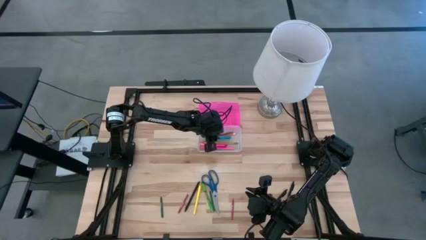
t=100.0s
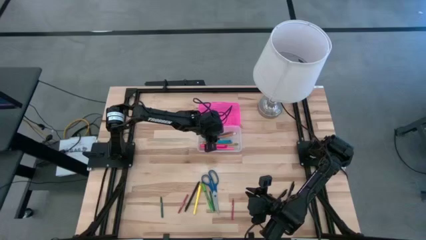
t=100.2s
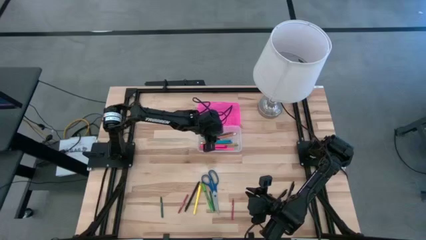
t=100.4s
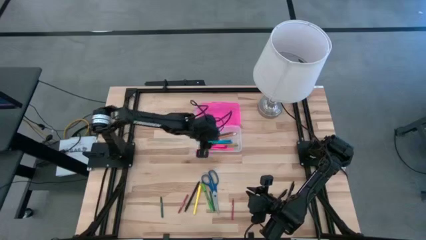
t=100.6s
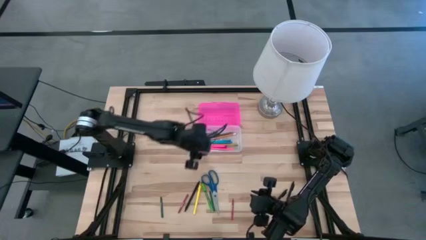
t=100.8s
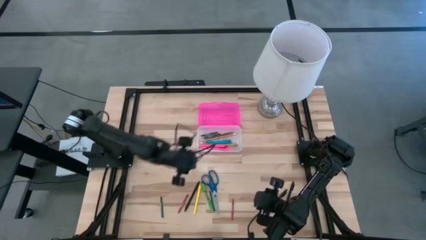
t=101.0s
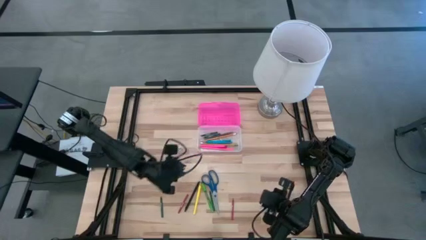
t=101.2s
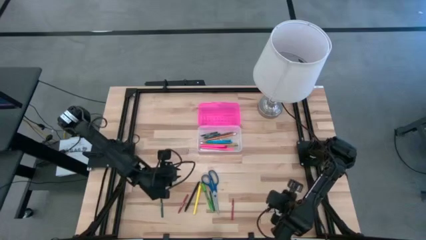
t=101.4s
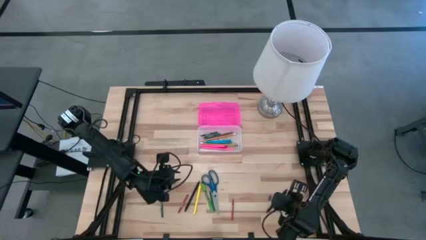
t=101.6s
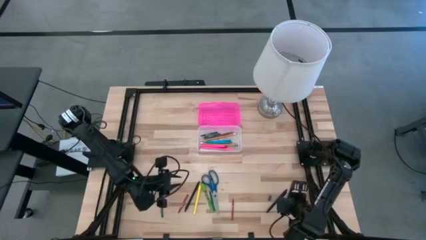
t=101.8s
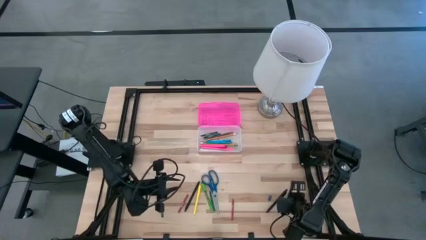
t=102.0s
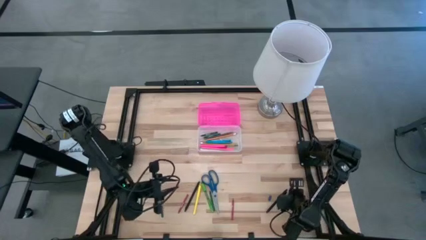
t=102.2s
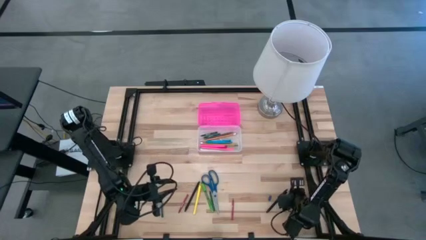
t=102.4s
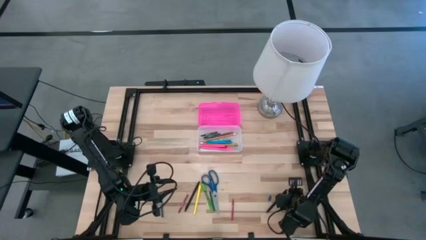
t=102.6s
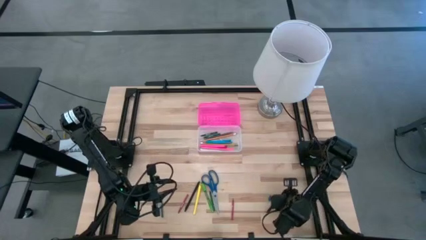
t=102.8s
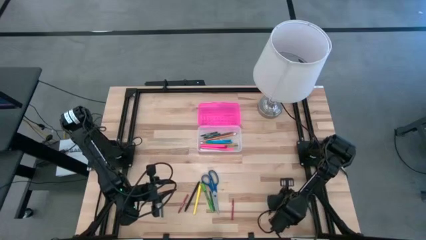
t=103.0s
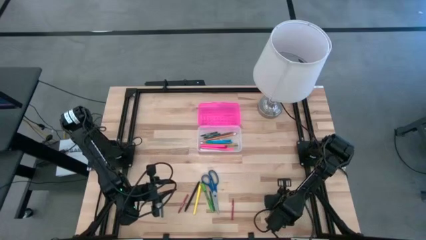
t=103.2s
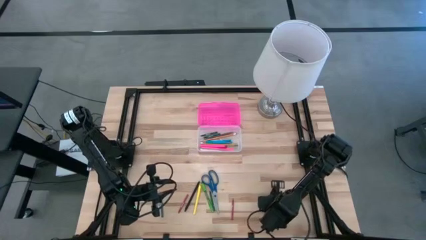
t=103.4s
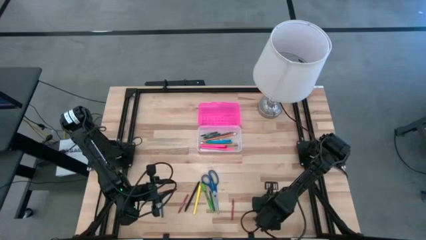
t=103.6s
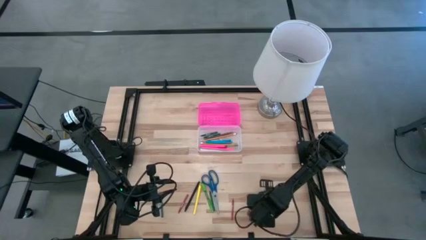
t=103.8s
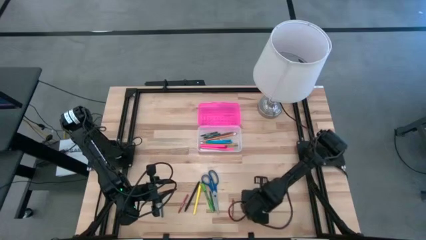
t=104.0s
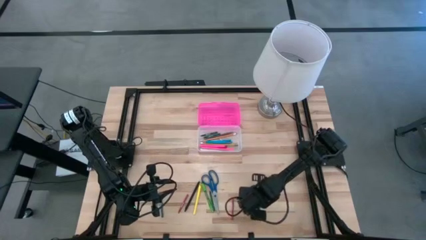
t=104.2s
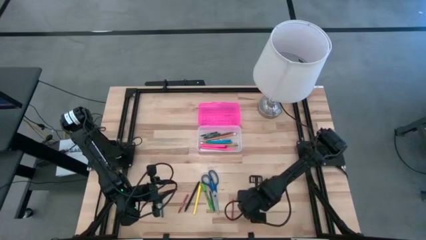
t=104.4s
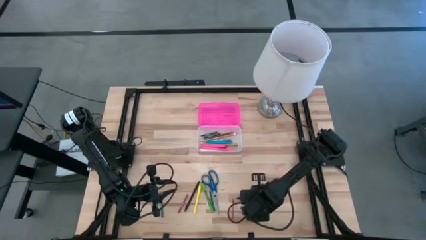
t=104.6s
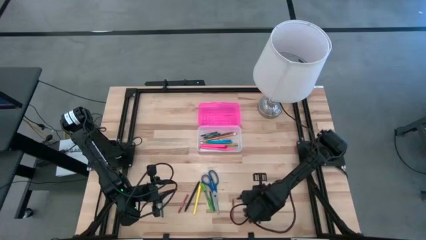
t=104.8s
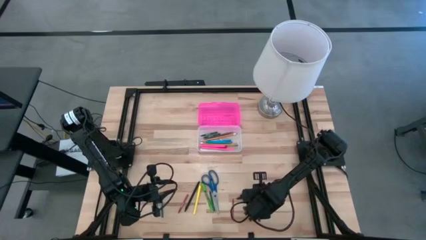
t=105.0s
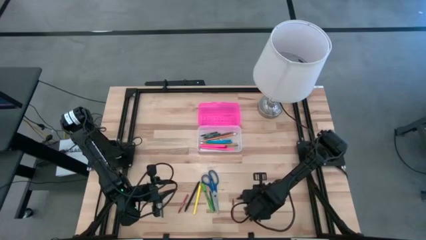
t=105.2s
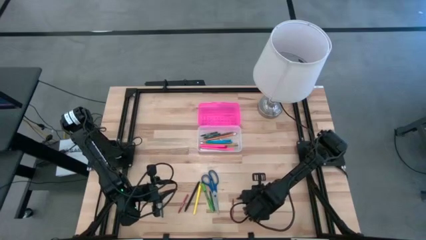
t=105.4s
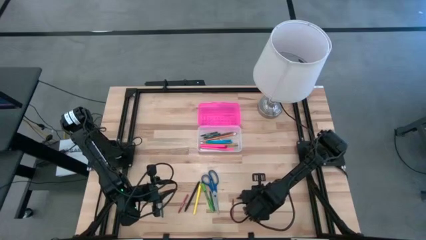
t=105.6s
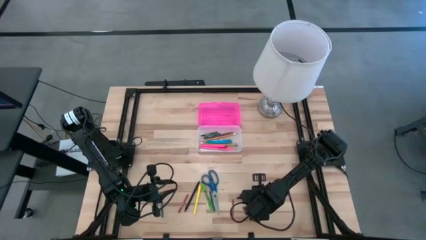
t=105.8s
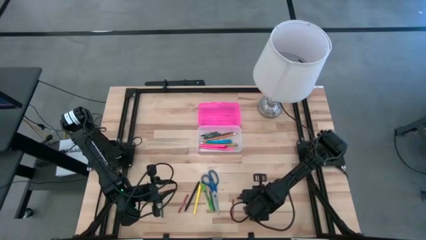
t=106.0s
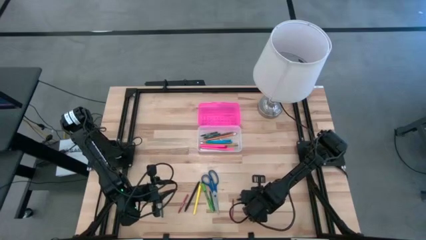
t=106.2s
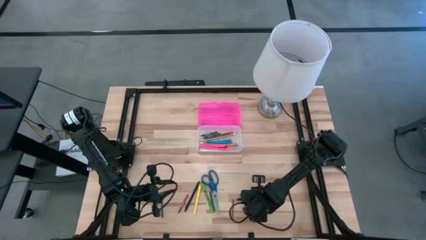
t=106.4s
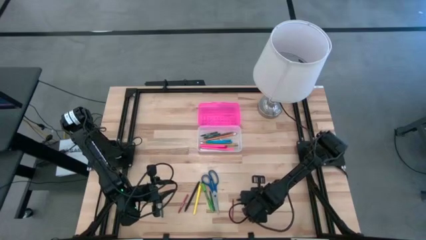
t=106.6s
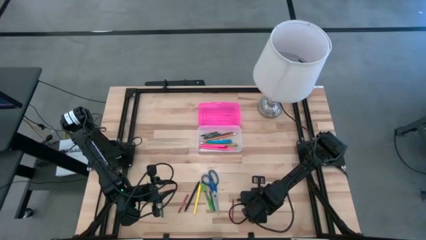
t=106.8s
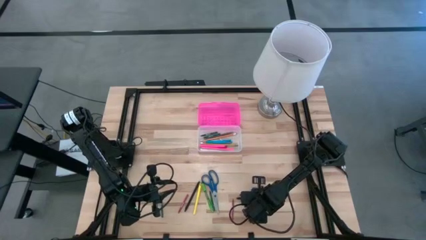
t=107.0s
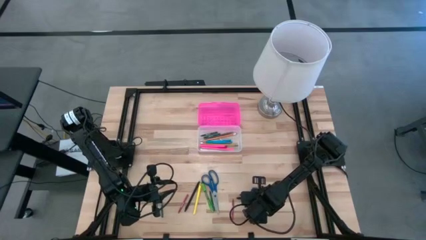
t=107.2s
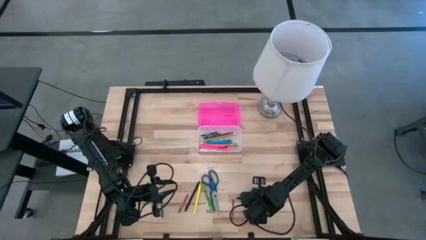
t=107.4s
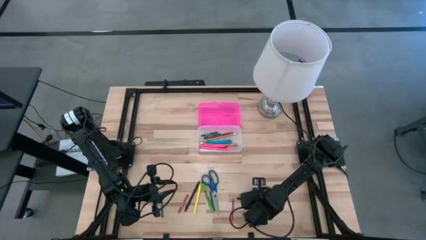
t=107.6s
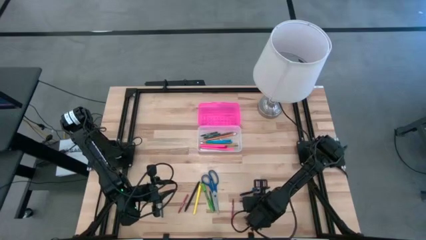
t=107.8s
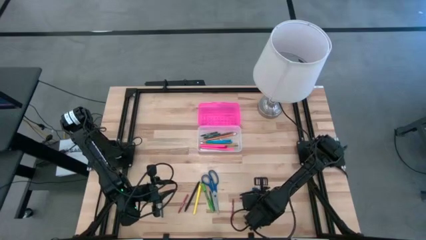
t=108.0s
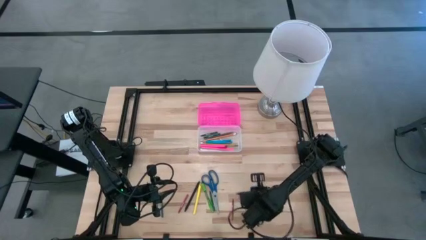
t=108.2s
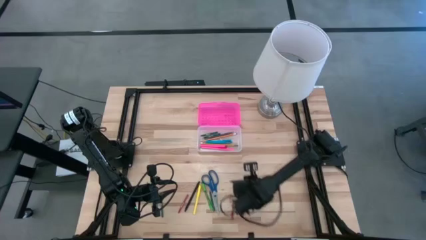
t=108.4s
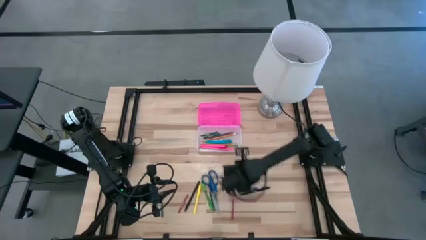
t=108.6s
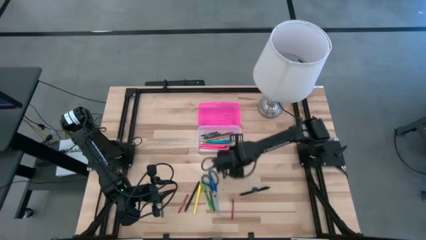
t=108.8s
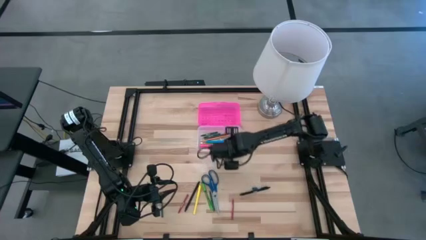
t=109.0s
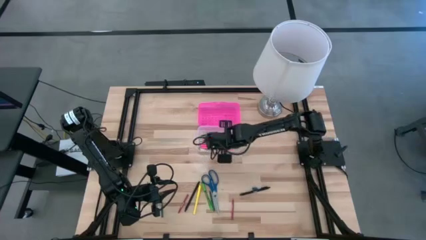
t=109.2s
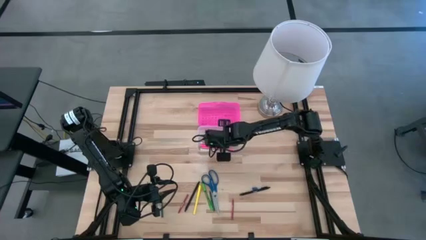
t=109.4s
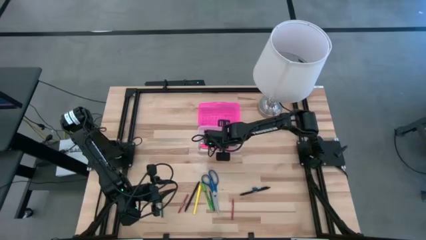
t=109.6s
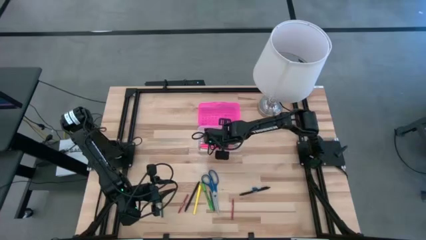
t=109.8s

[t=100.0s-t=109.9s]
Task: Pick & place school supplies into a supply box
Put the right black pen into the supply box

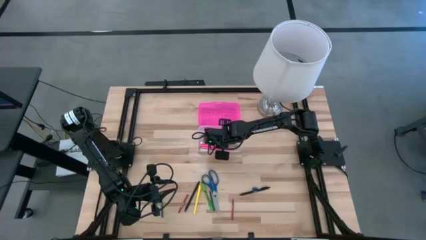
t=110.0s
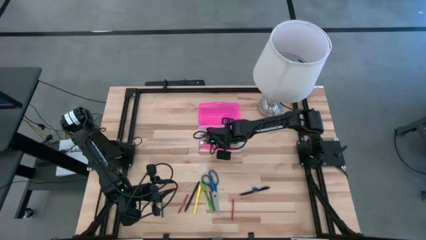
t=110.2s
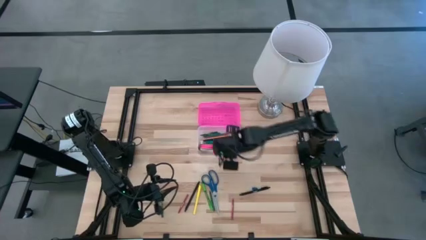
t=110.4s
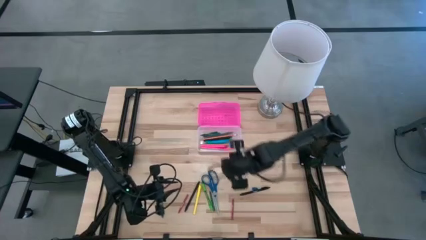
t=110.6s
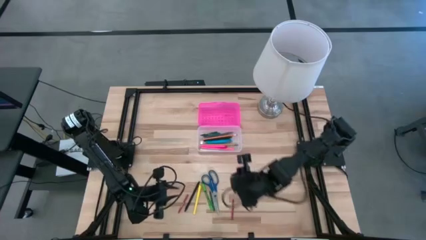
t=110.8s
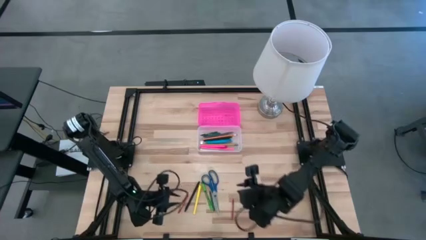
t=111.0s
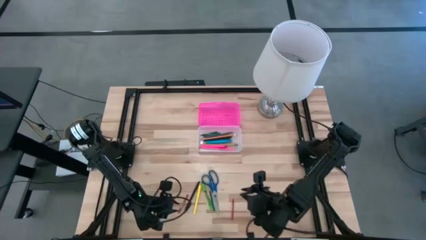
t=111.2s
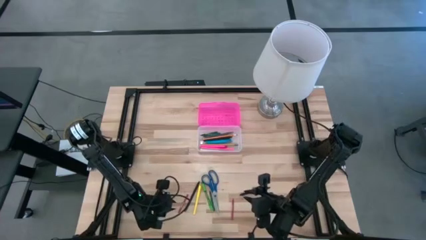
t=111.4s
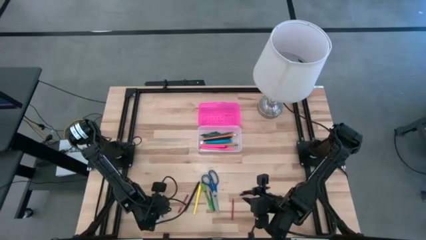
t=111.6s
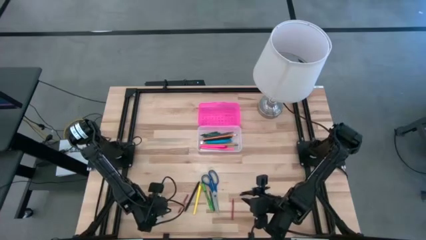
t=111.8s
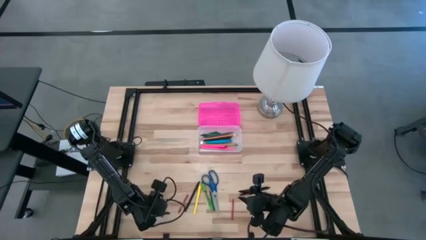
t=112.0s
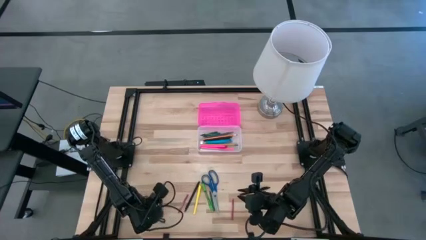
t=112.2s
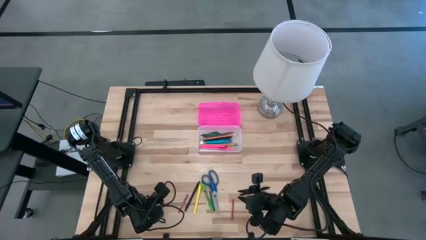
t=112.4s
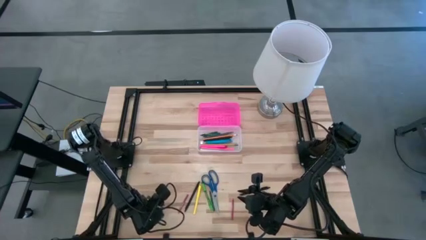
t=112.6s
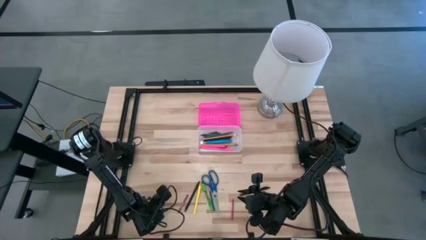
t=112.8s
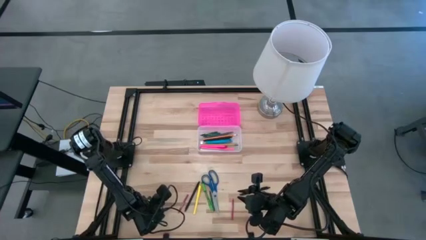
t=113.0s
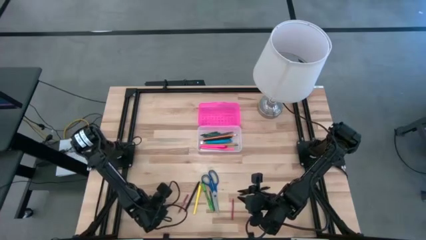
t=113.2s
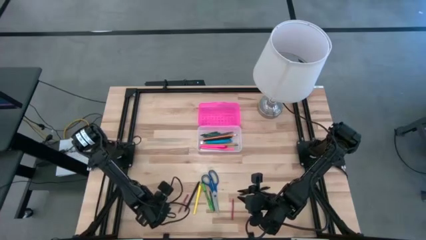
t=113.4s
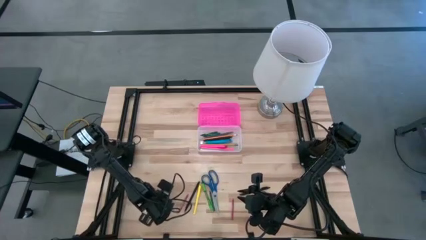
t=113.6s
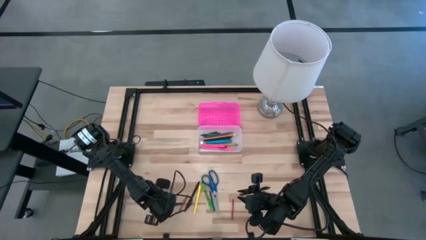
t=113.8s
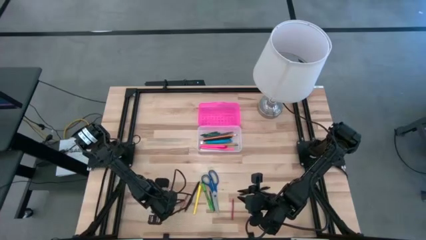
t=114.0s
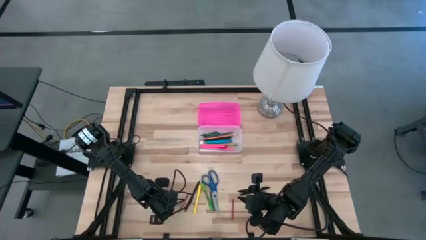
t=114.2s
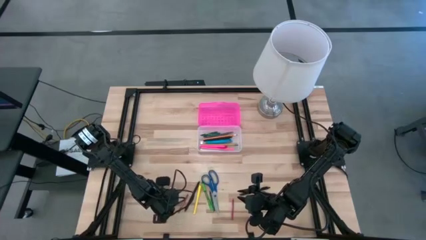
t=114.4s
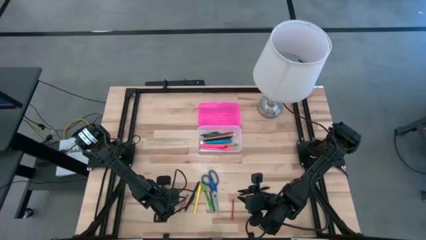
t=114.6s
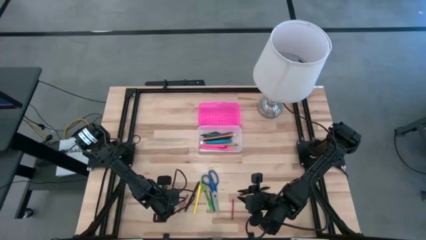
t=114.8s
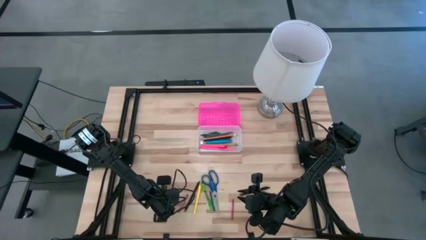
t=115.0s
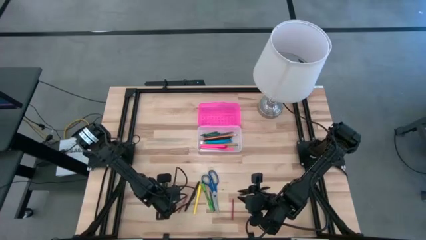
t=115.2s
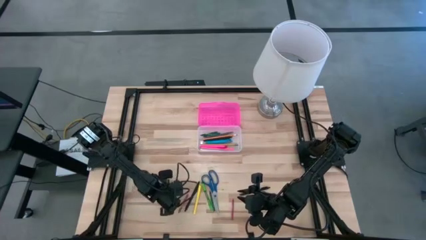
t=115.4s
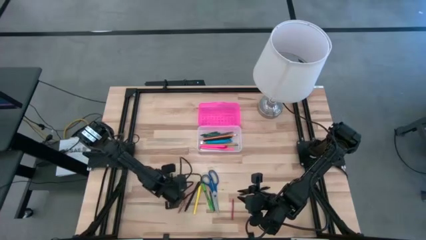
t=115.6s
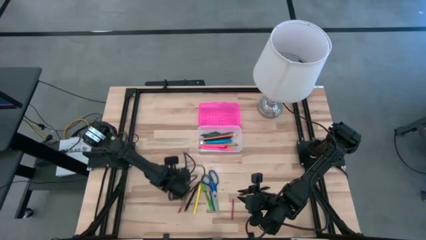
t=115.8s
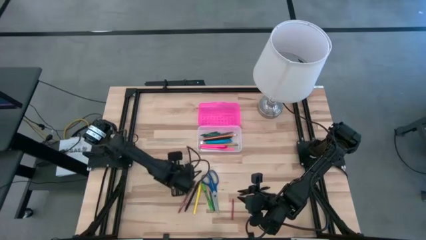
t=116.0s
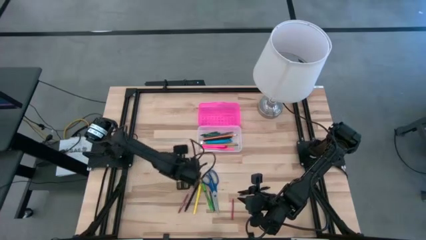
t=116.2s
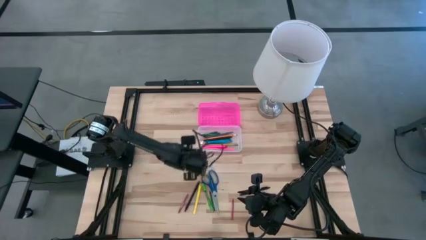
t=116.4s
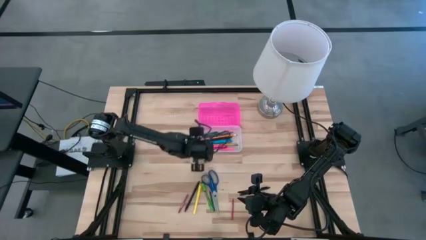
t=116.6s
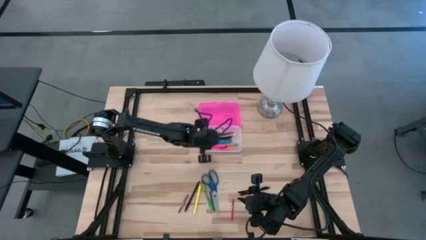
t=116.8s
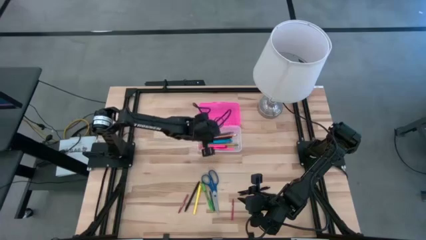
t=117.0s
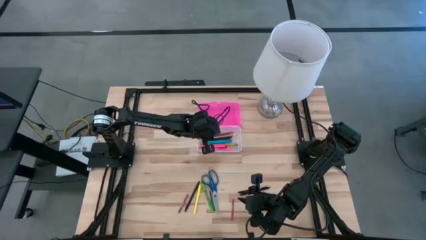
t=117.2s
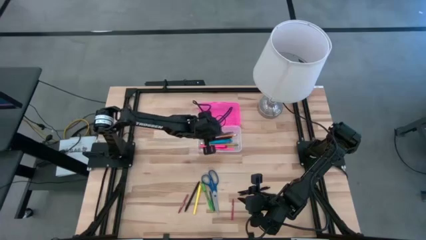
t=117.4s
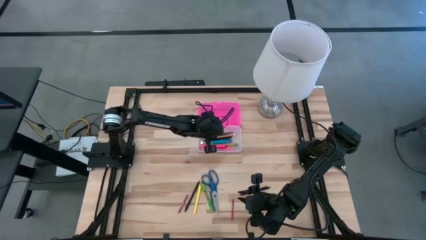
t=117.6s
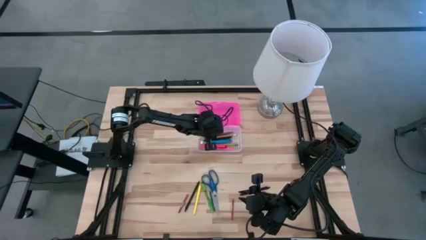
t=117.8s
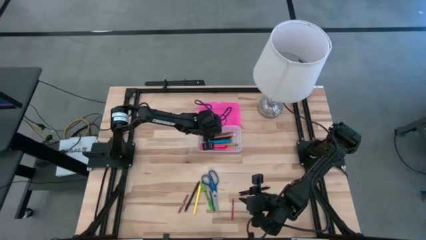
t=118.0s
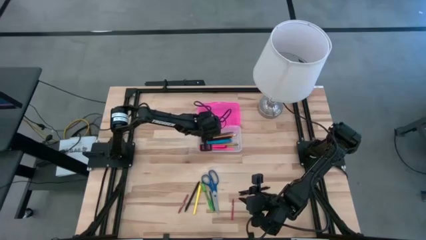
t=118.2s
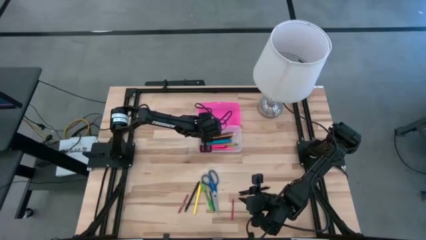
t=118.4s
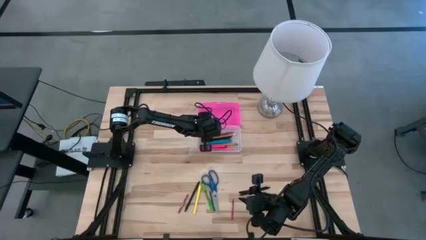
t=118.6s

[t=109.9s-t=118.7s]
Put the left green crayon into the supply box
